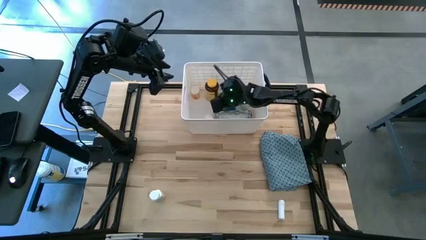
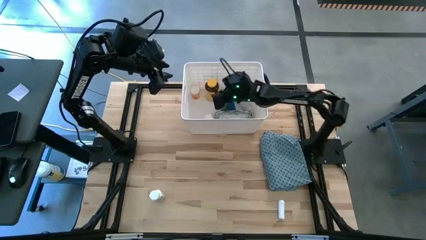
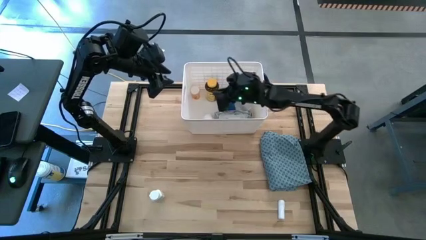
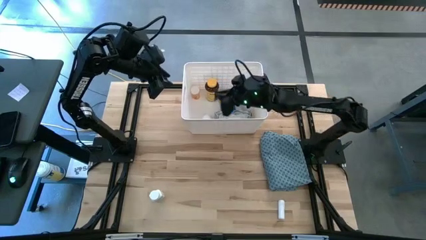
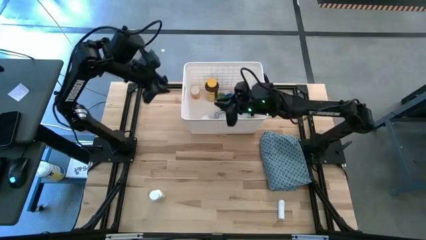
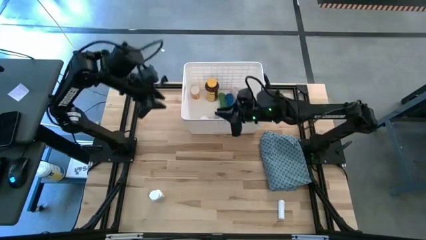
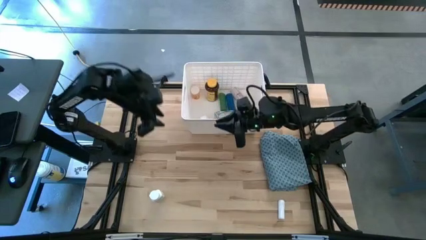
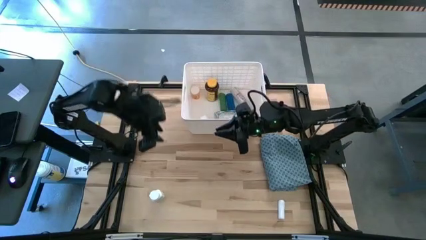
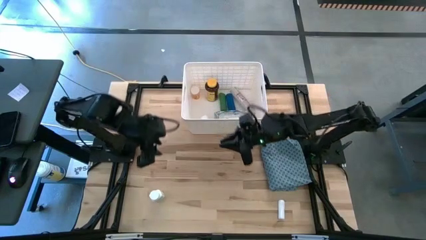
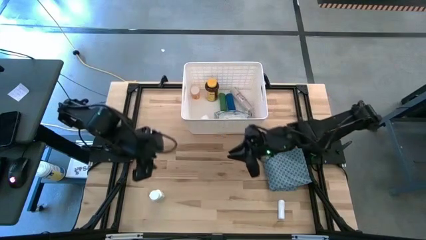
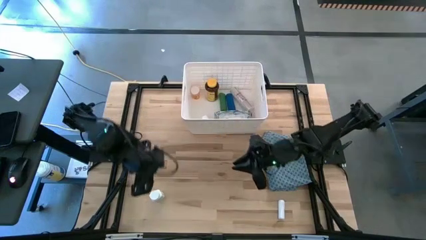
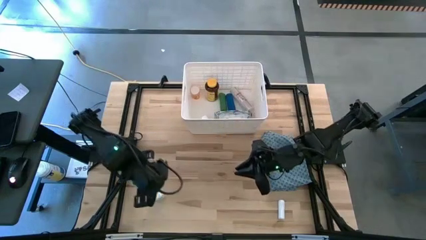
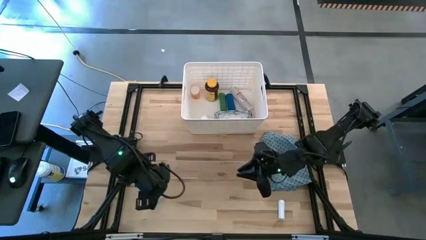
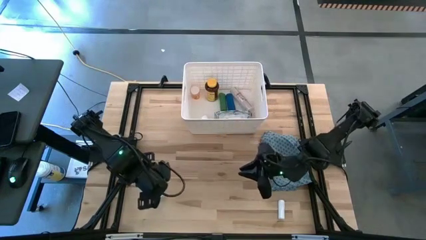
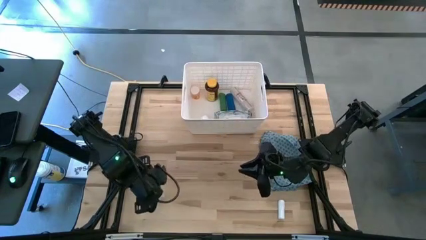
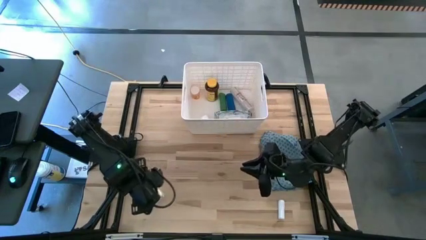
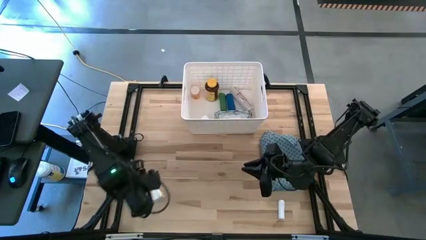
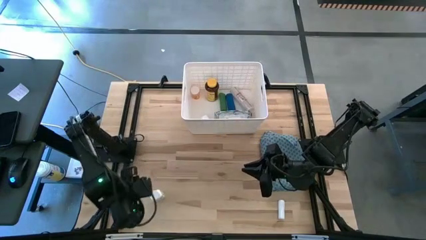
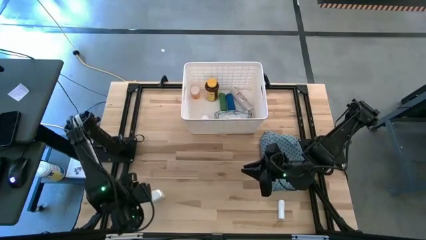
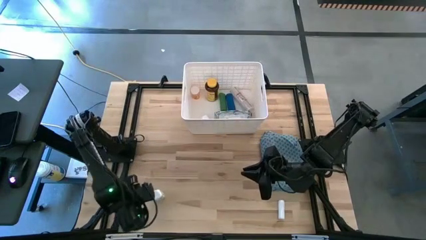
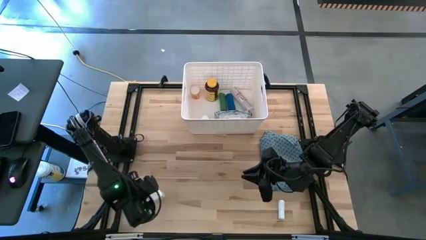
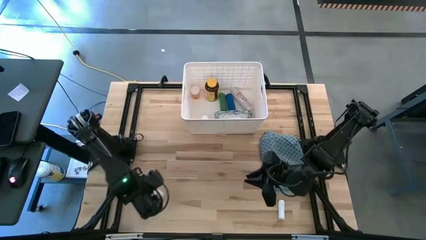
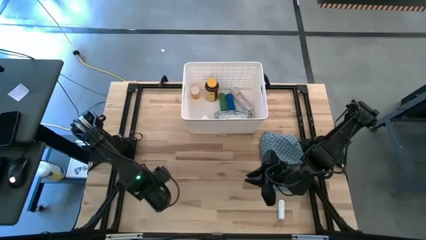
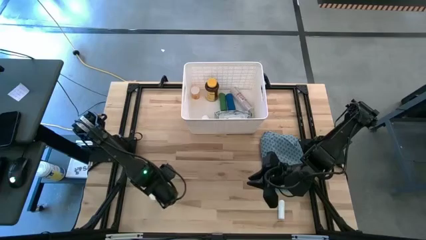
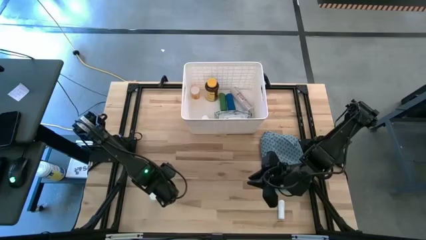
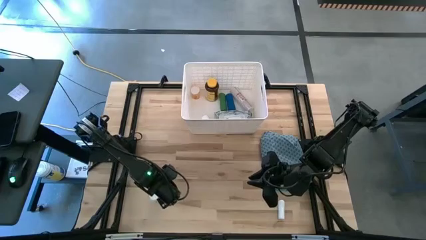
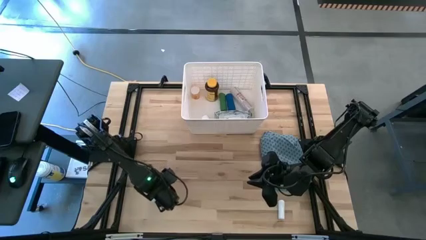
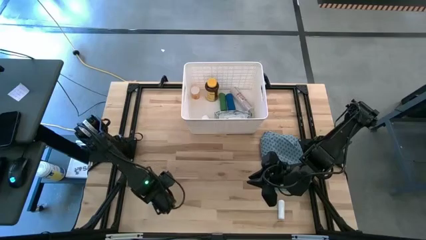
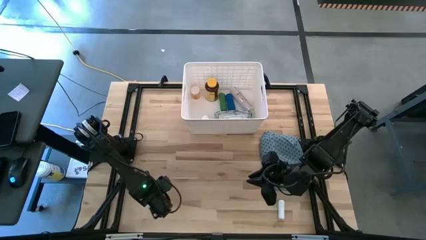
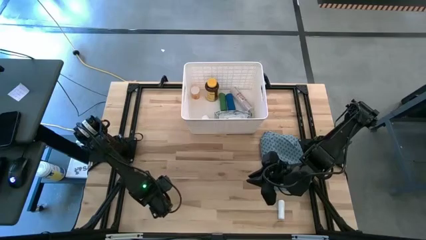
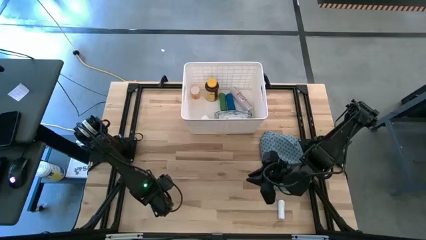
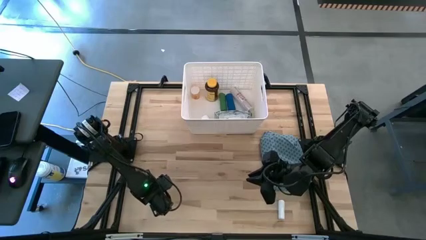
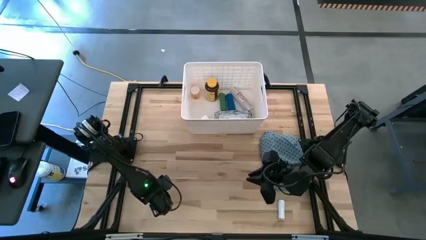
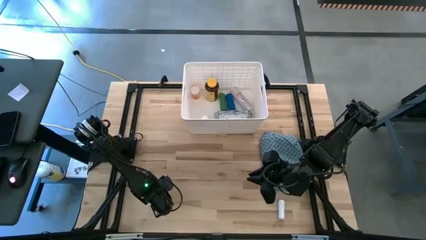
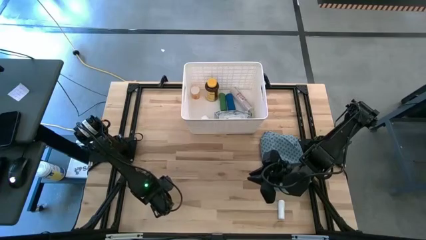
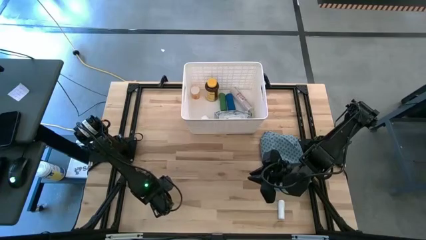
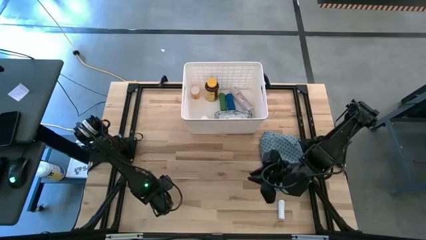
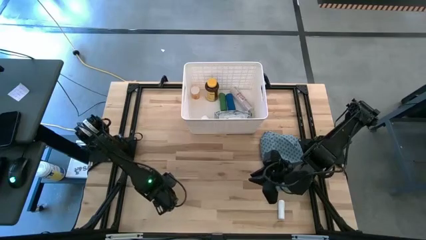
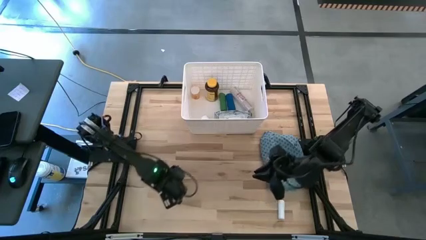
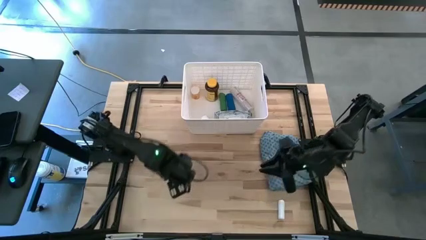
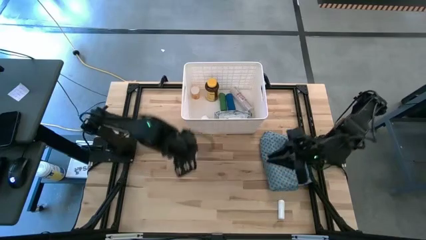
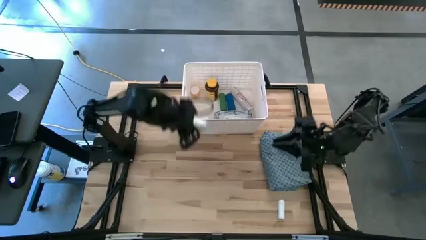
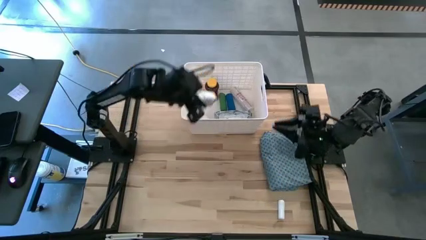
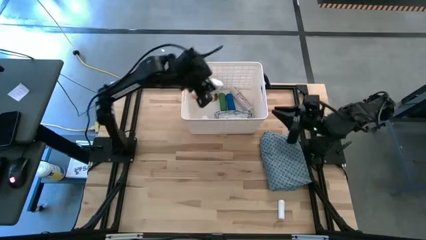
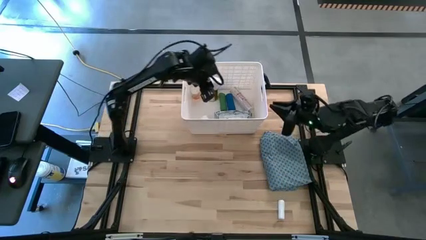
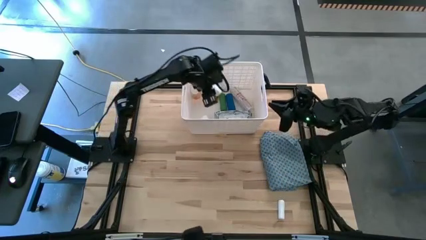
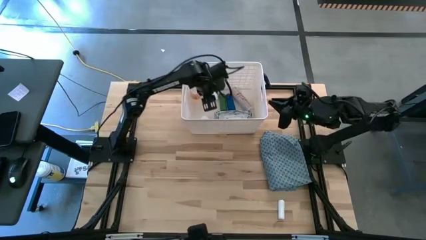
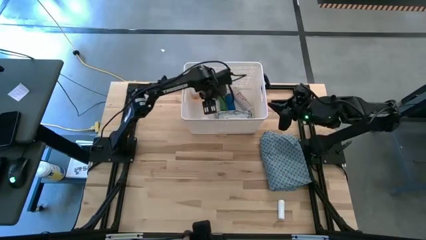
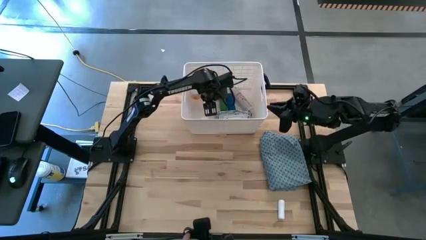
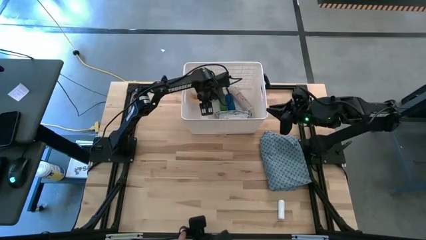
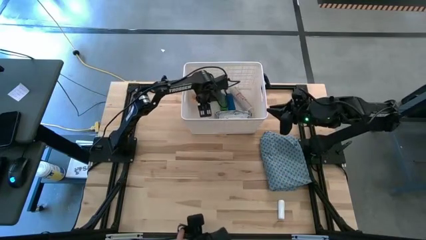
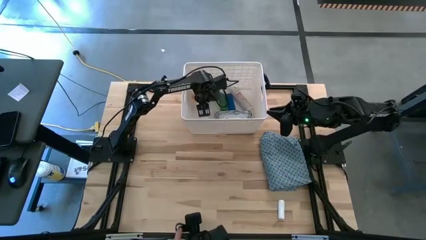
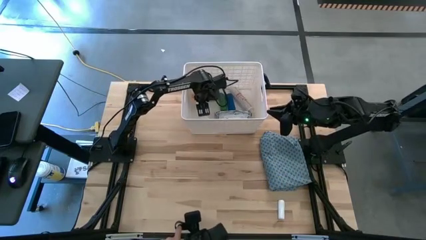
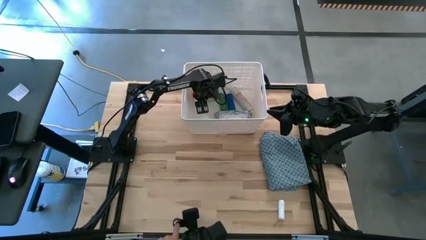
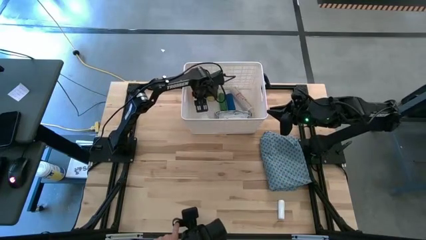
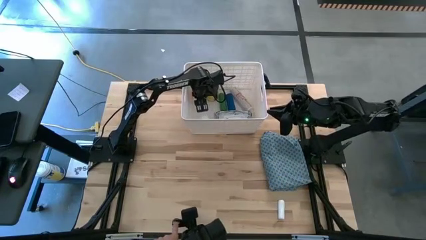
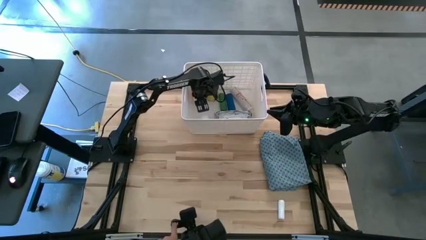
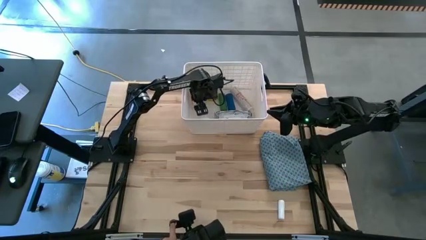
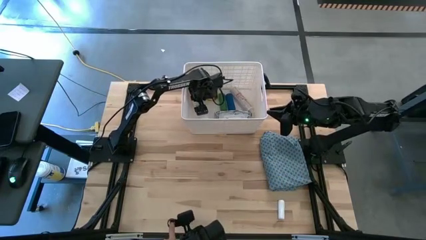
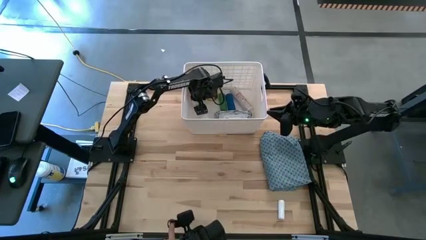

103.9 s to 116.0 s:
Task: Pick & place medical supplies in basket/bin
Put the white and blue medicine bottle into the white bin

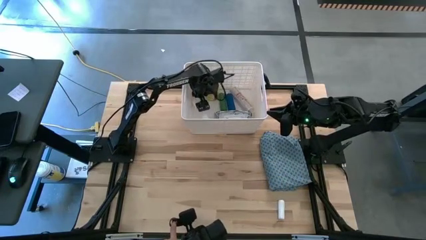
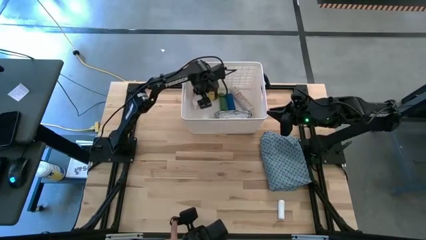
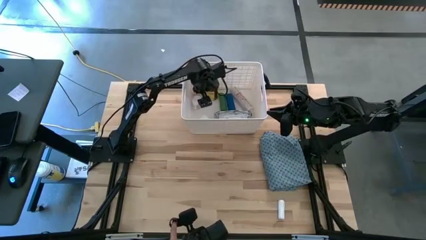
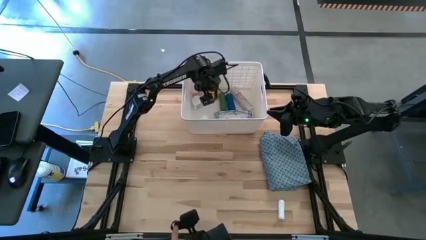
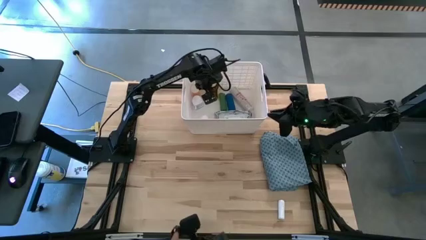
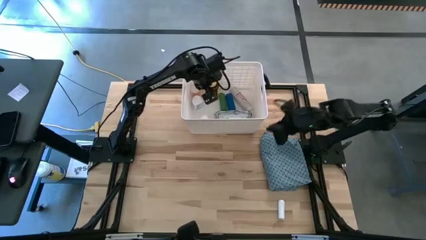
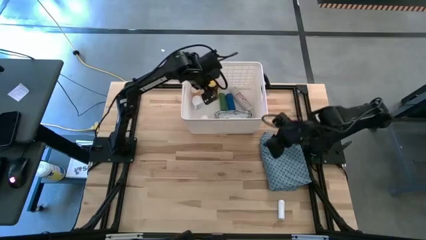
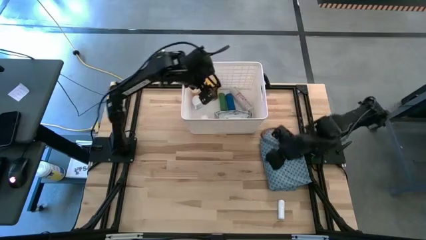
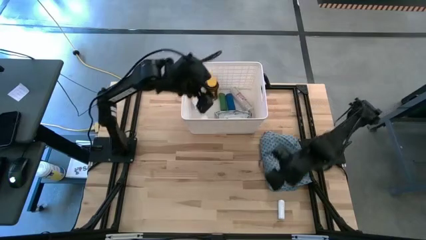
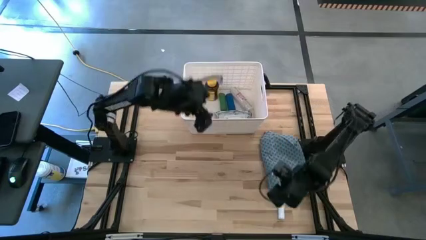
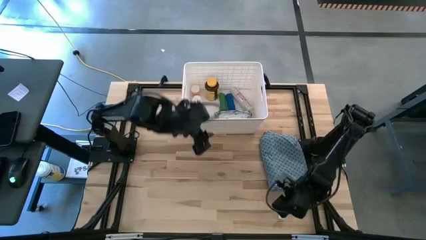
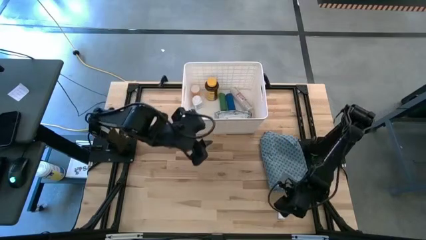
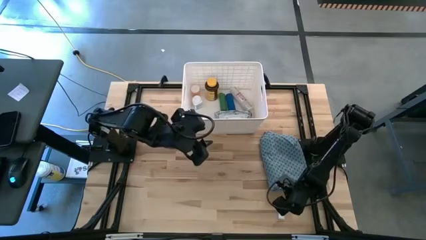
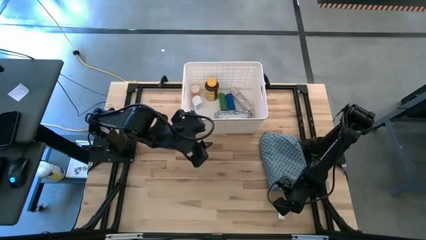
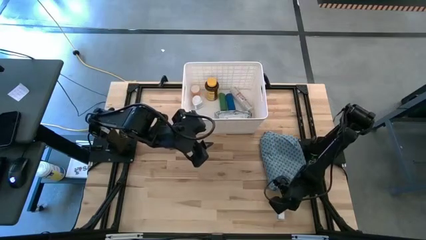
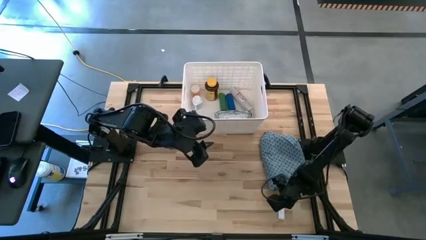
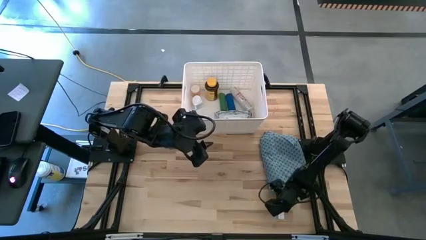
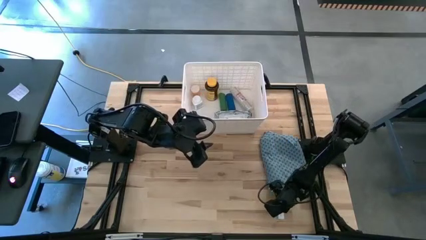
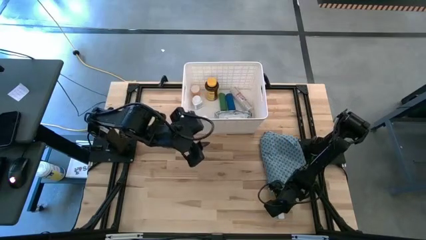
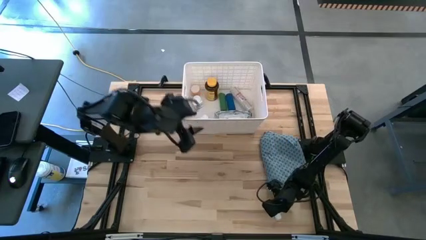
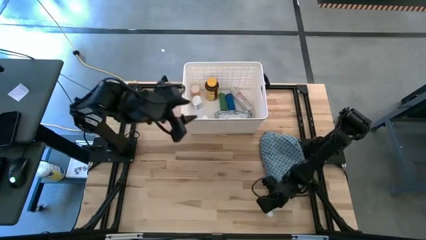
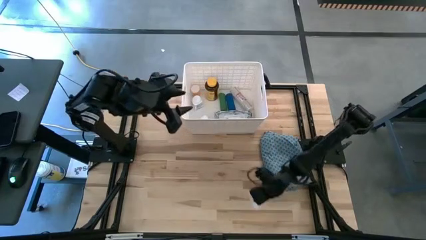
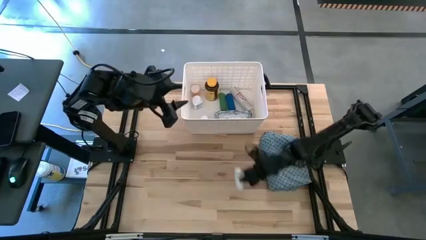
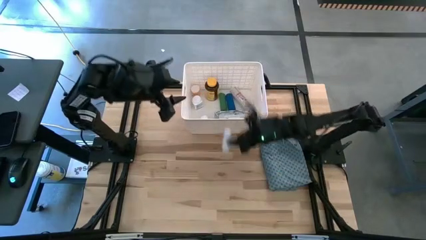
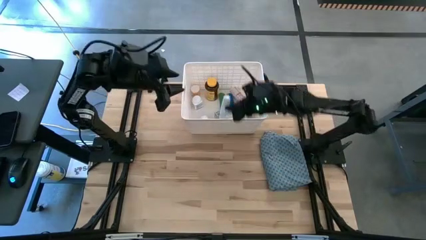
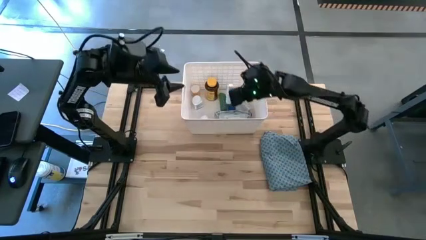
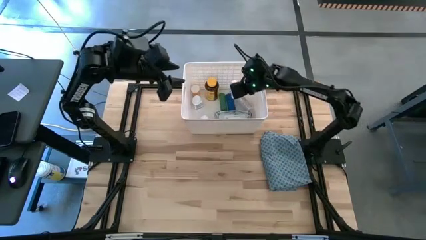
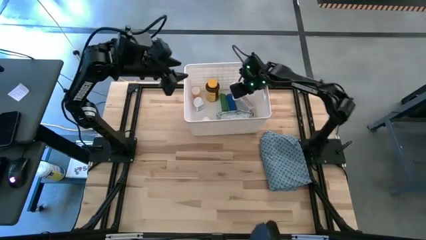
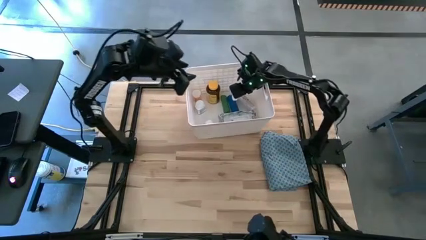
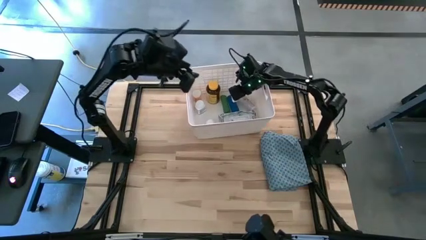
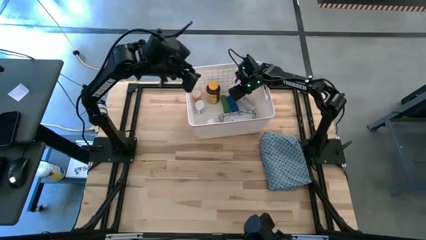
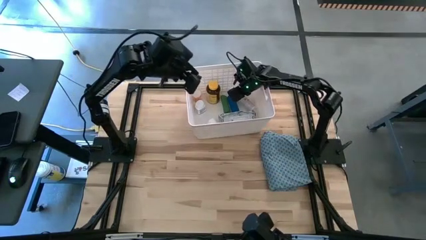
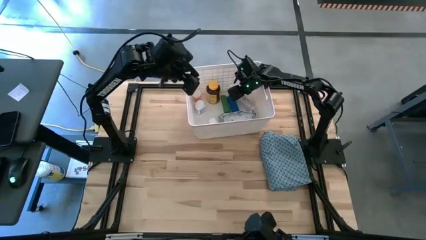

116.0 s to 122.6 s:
Put the white rolled gauze into the white bin
